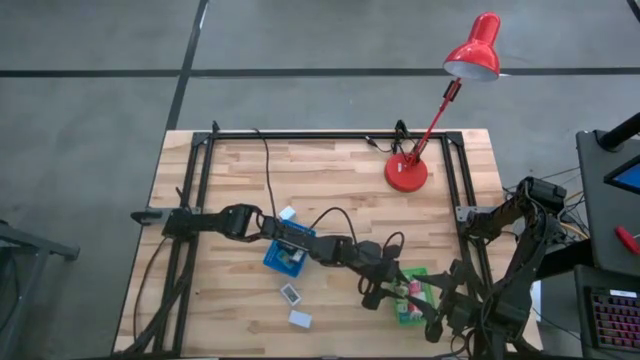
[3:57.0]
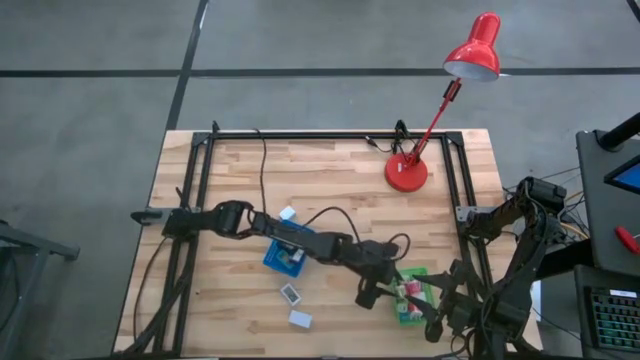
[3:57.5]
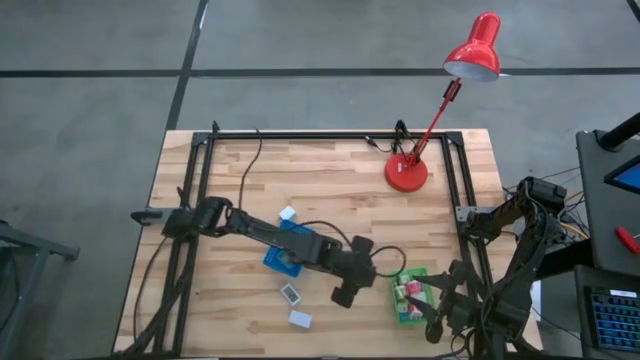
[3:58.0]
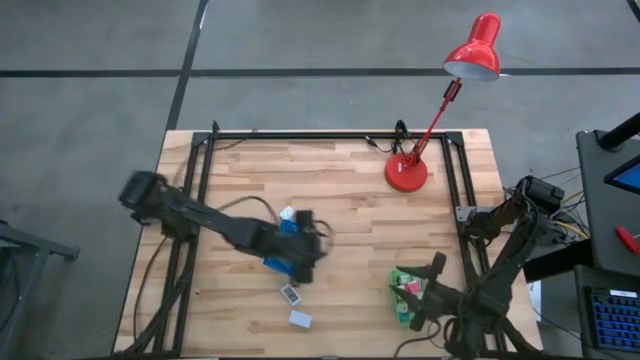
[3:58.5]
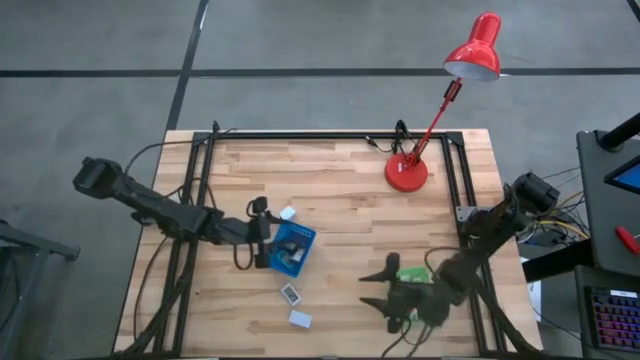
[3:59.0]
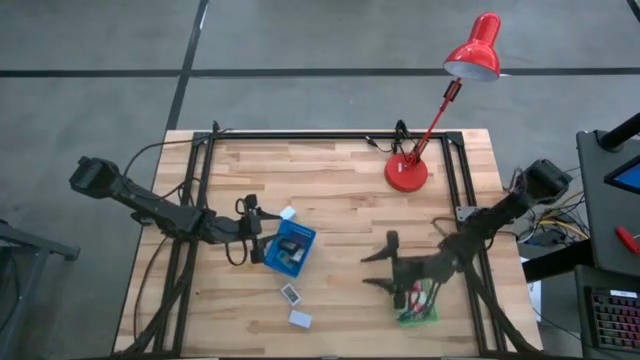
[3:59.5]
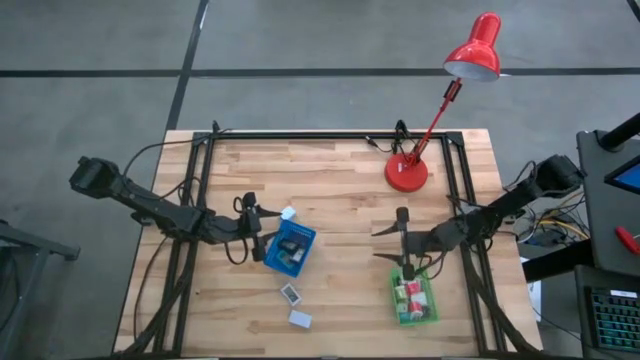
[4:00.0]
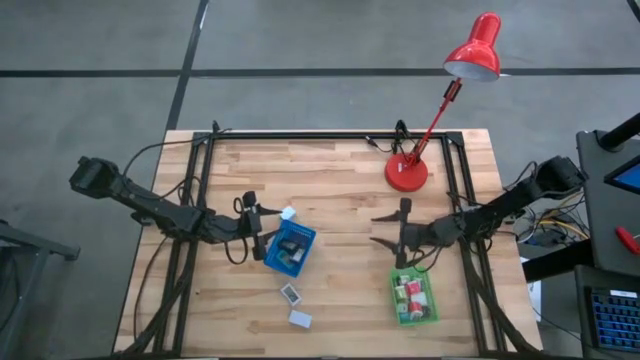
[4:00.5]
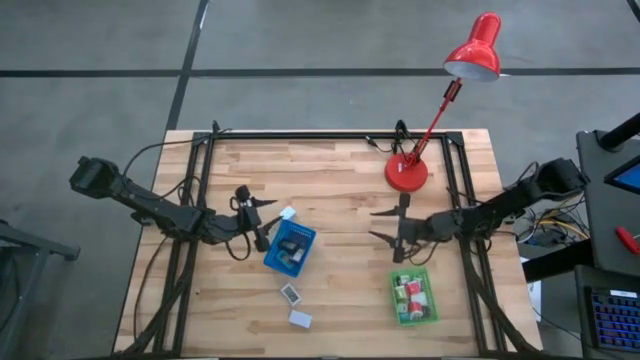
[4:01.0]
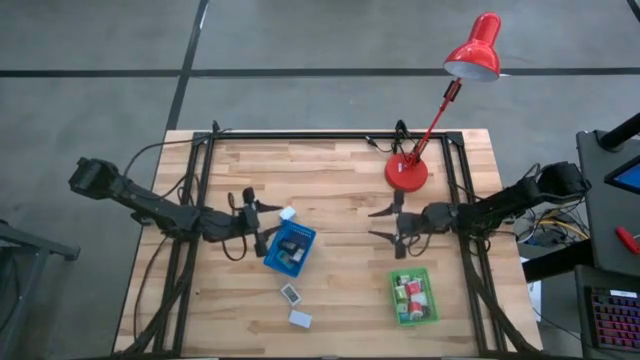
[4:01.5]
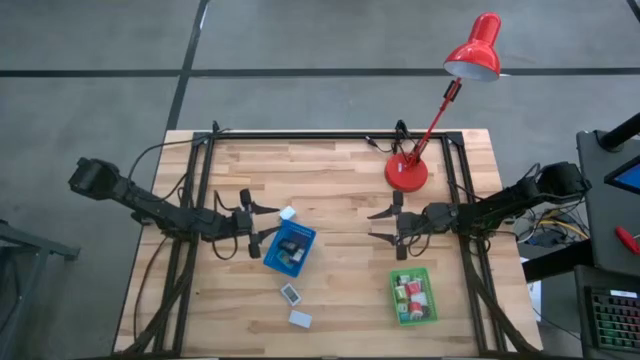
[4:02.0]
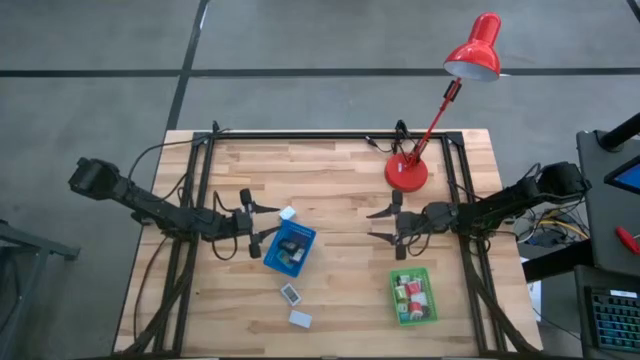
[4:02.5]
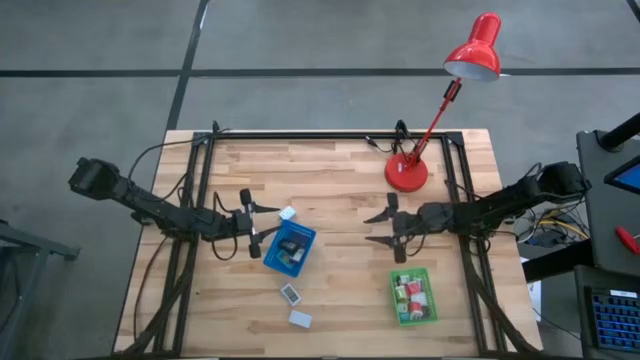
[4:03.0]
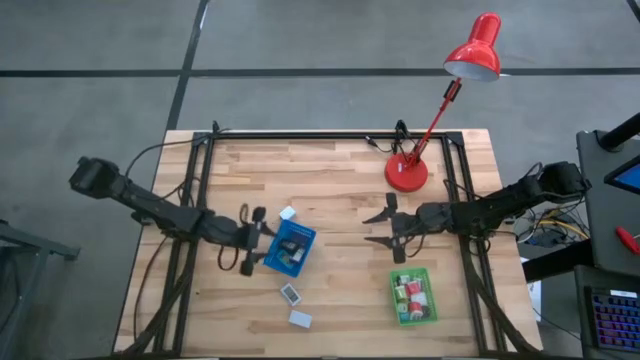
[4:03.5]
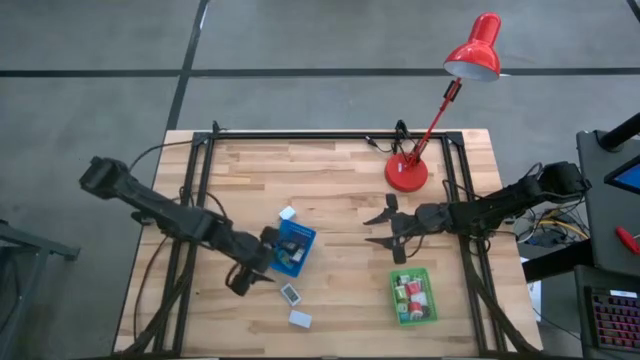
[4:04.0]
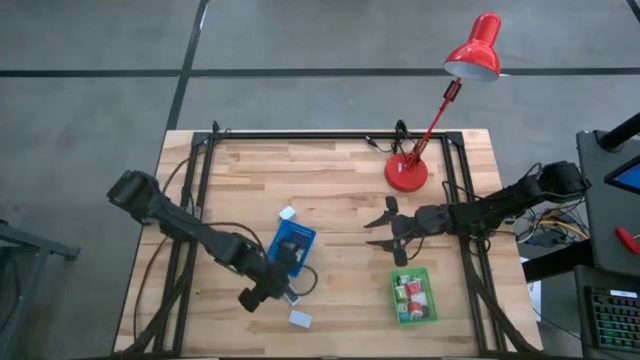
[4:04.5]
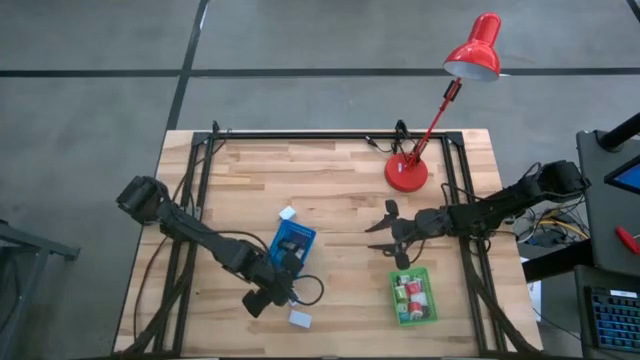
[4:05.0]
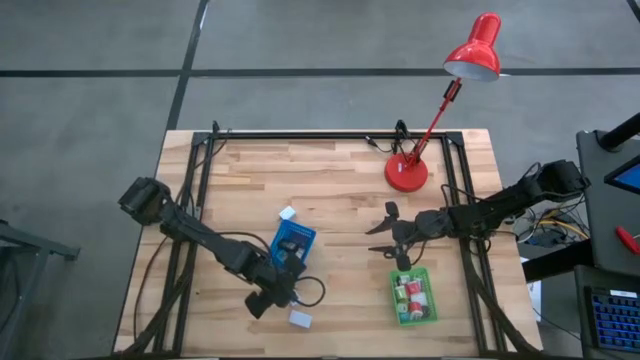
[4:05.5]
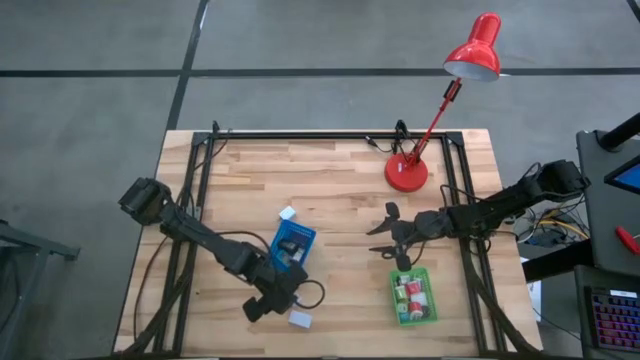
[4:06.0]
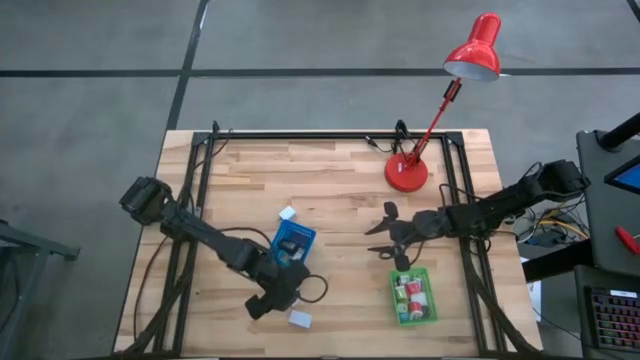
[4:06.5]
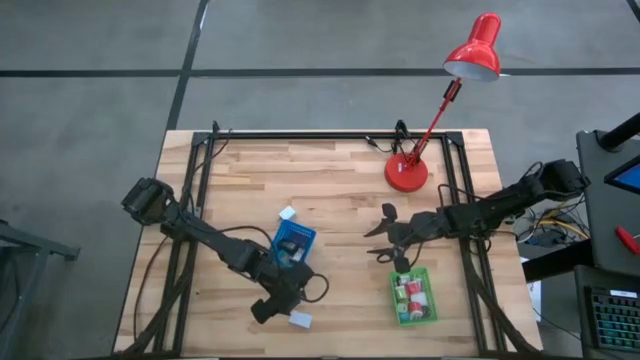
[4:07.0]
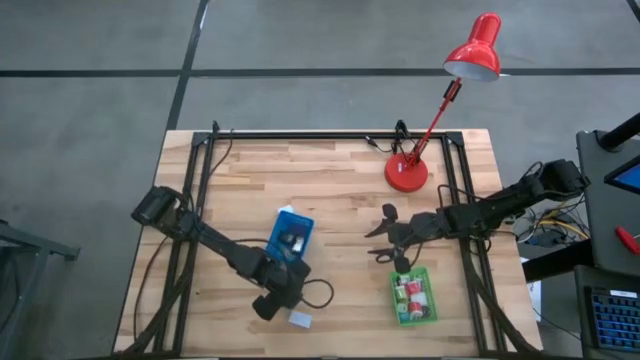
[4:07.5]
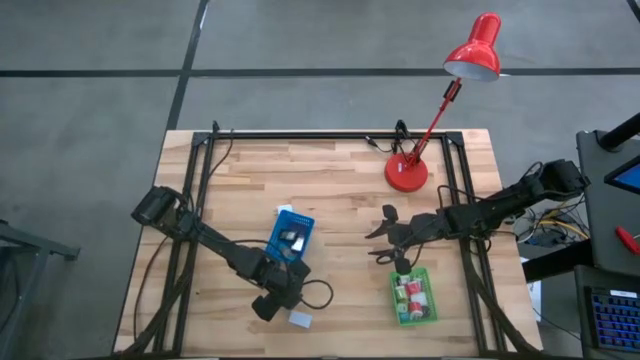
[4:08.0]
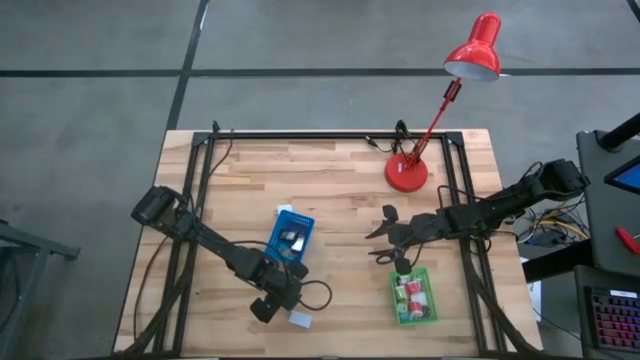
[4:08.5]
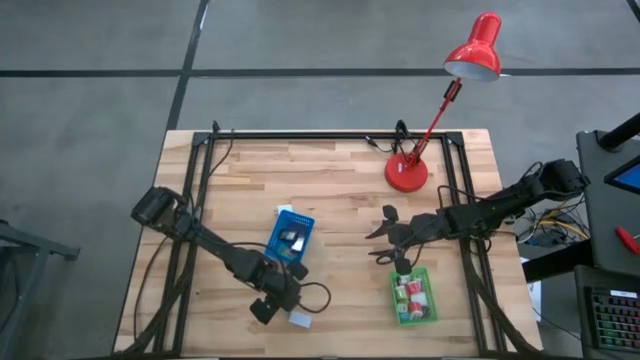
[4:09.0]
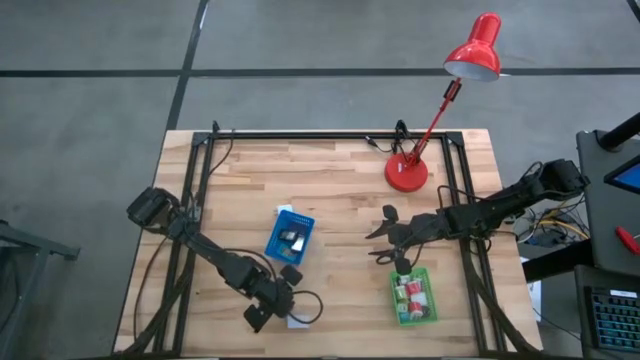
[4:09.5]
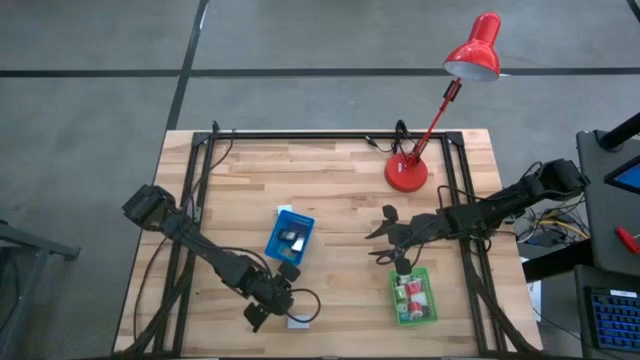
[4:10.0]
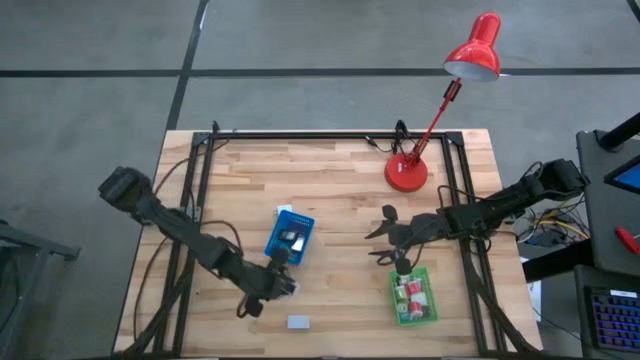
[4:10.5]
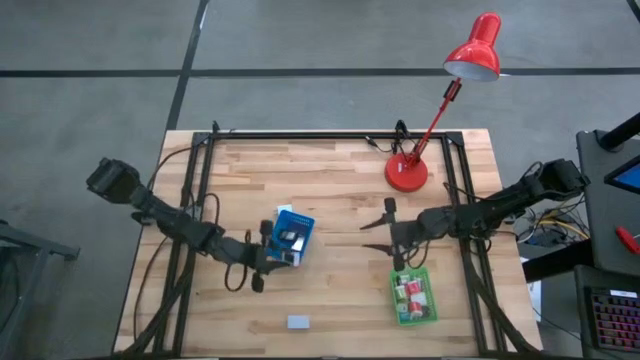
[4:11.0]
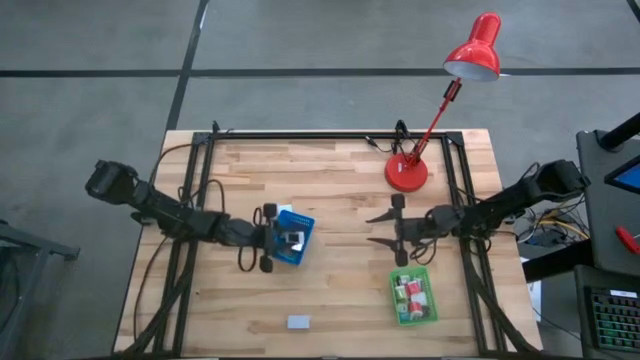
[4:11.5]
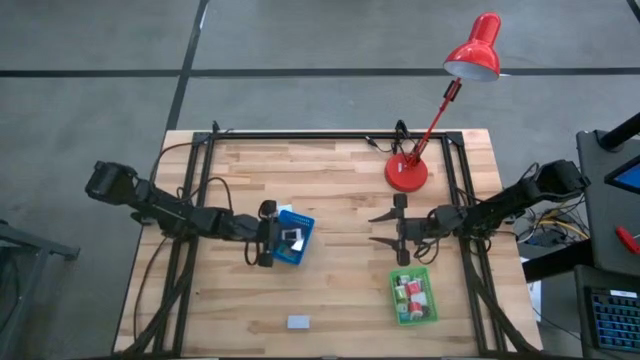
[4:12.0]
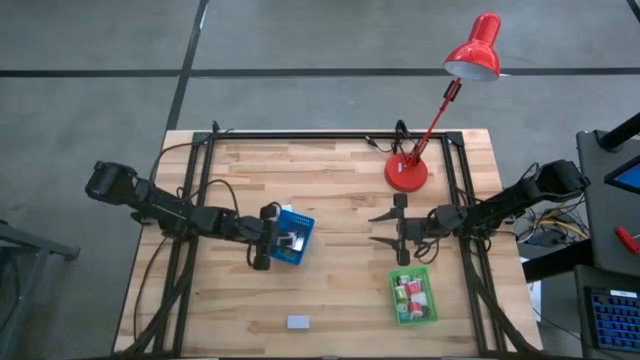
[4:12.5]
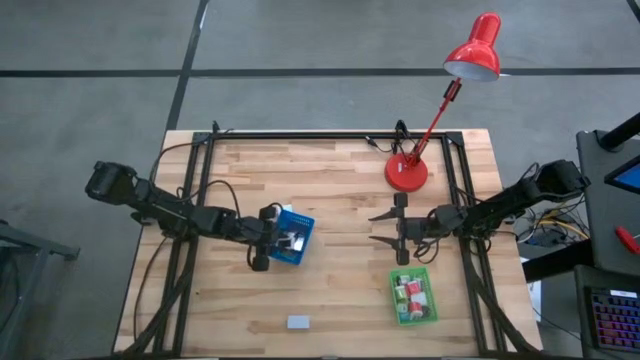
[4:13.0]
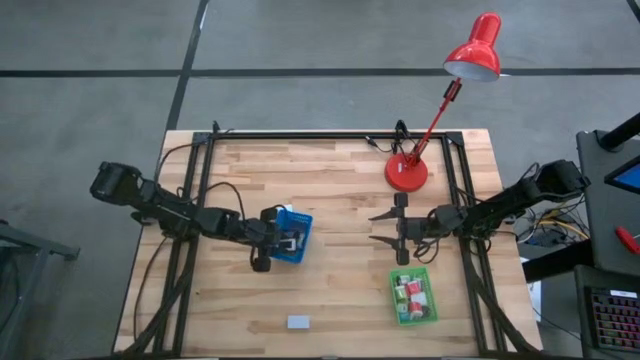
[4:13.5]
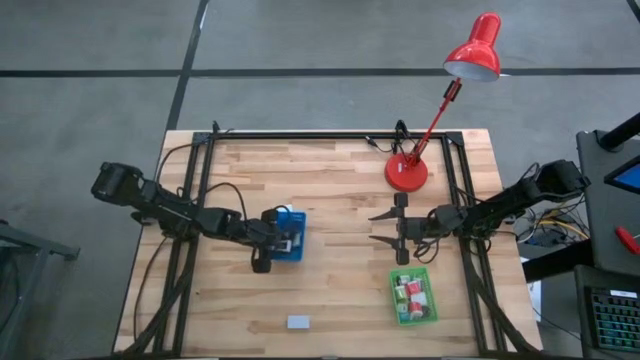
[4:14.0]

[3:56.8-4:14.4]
Task: Pick & Place Office items
Put the top white digital clock into the blue bin
